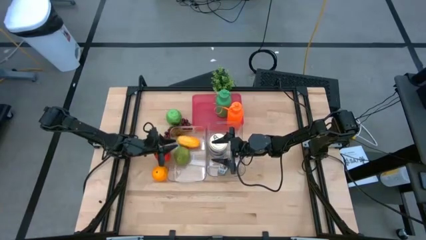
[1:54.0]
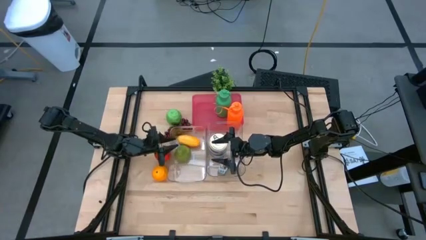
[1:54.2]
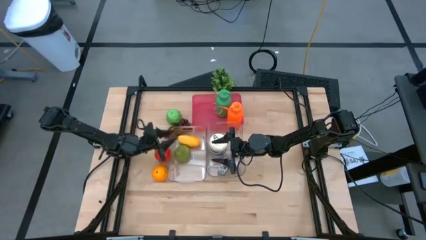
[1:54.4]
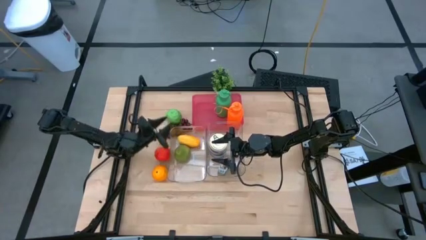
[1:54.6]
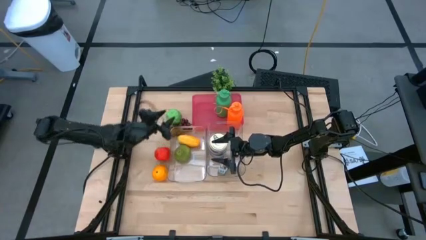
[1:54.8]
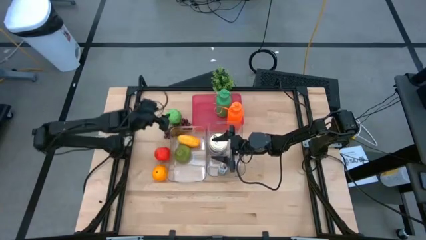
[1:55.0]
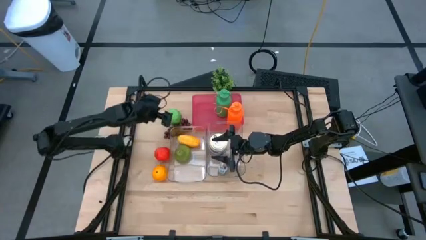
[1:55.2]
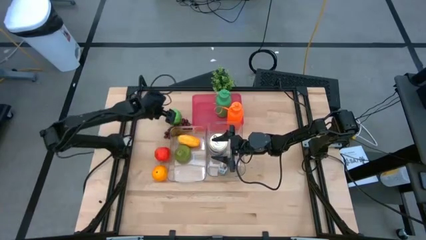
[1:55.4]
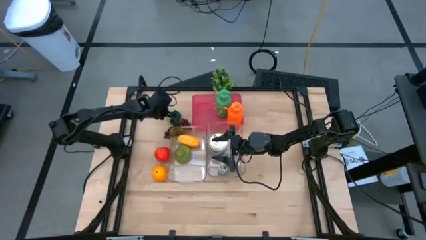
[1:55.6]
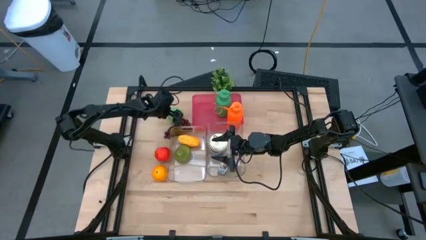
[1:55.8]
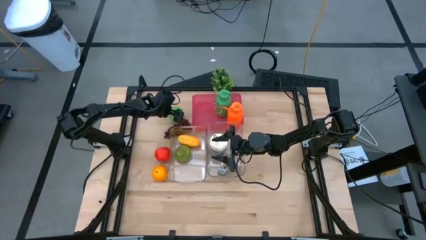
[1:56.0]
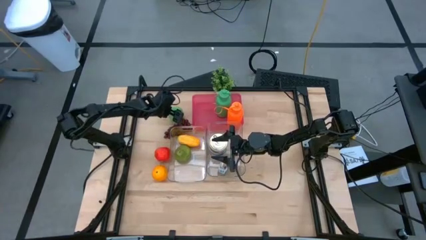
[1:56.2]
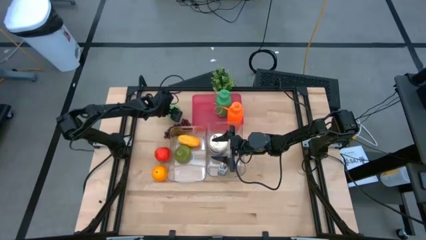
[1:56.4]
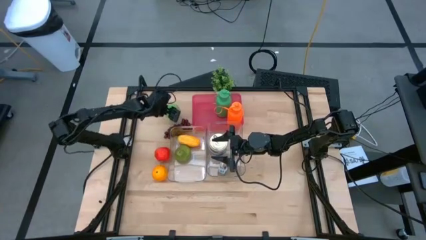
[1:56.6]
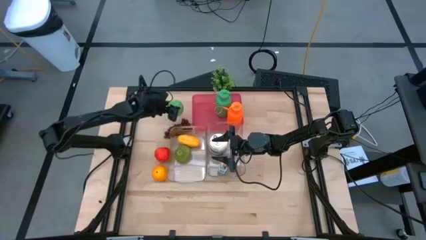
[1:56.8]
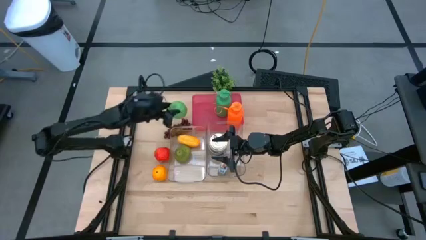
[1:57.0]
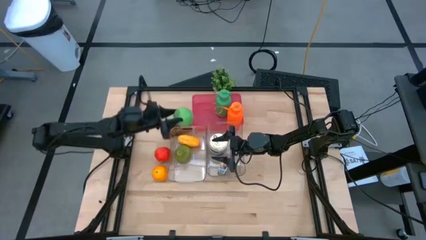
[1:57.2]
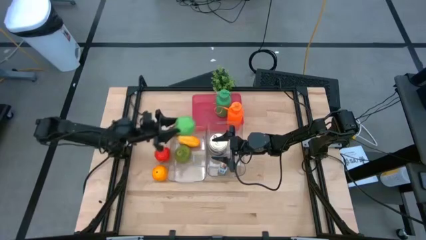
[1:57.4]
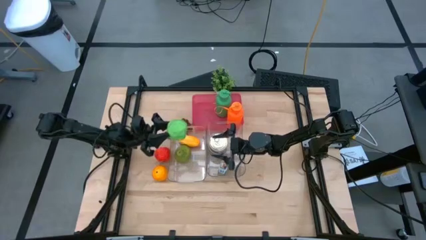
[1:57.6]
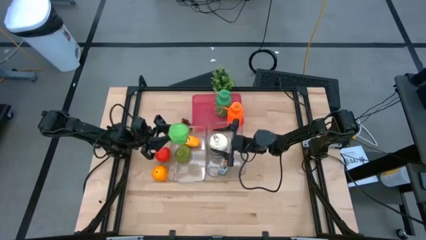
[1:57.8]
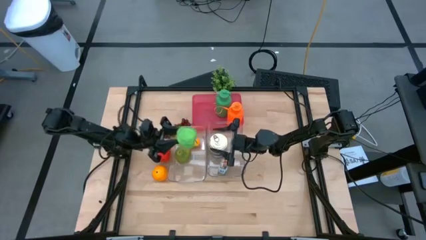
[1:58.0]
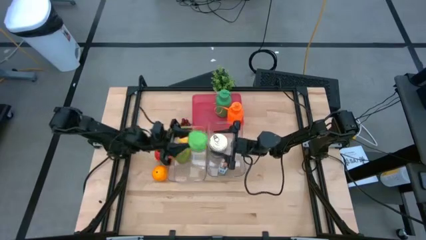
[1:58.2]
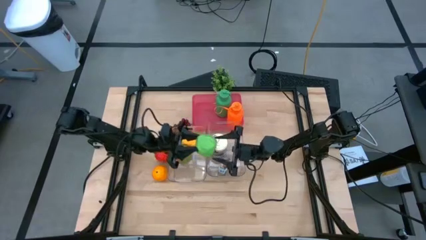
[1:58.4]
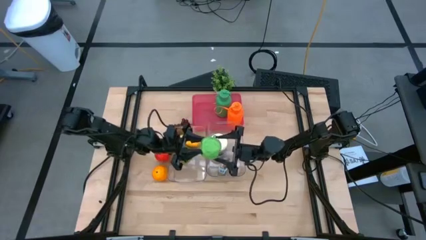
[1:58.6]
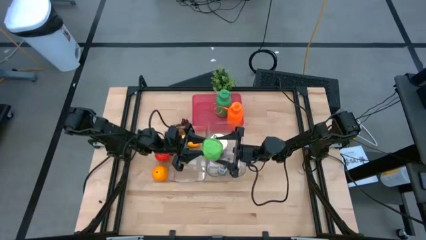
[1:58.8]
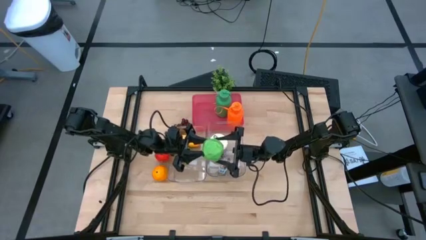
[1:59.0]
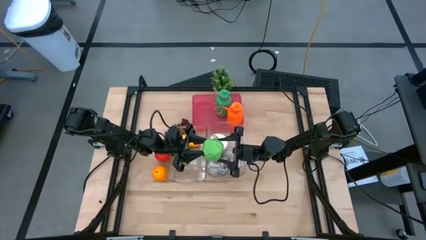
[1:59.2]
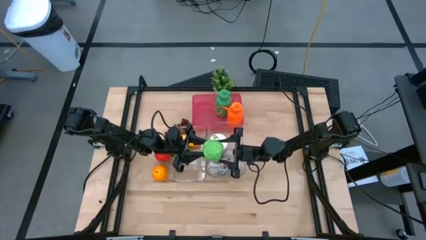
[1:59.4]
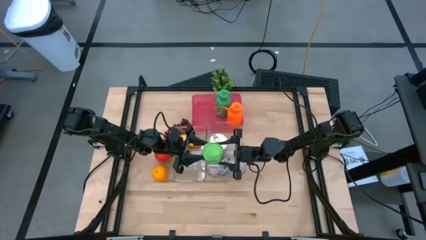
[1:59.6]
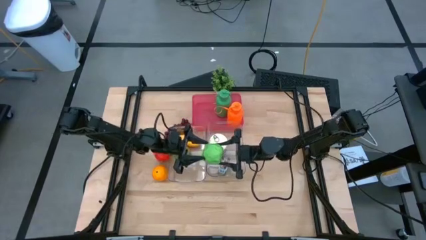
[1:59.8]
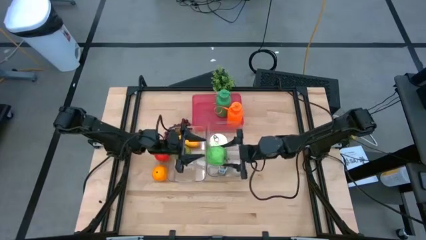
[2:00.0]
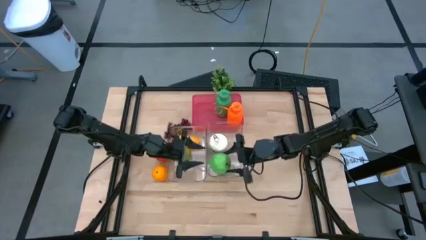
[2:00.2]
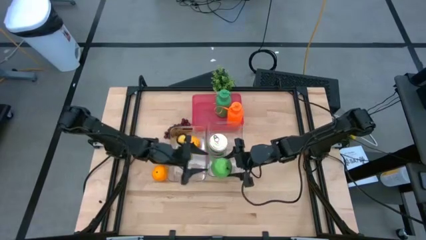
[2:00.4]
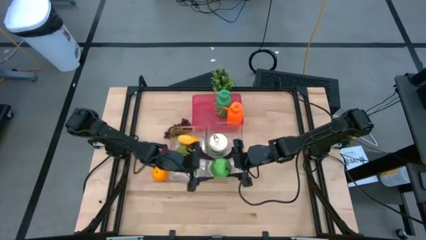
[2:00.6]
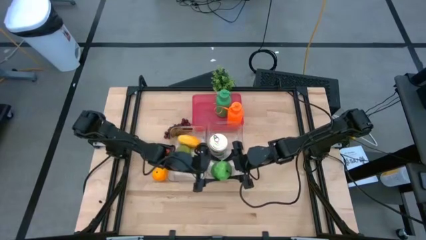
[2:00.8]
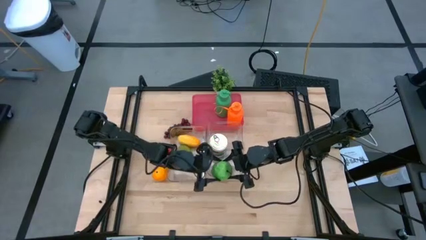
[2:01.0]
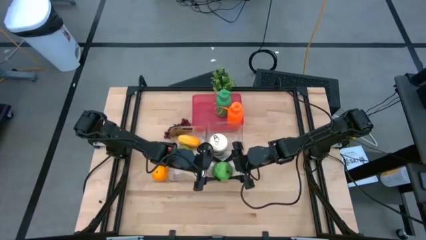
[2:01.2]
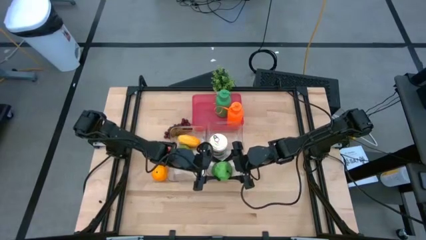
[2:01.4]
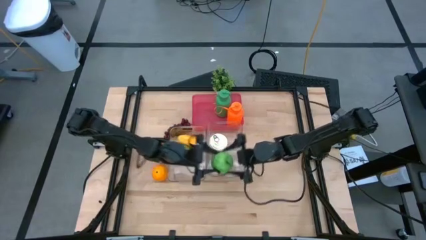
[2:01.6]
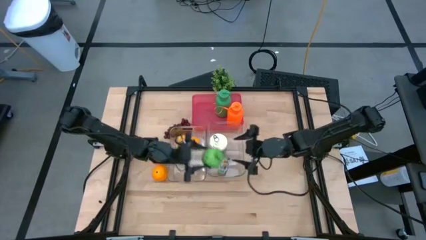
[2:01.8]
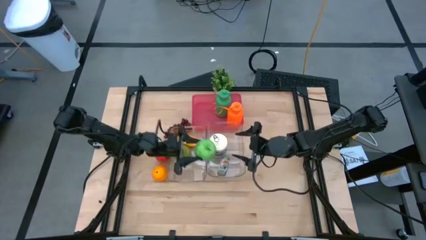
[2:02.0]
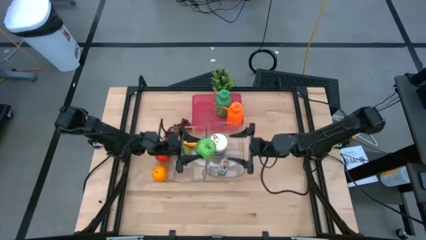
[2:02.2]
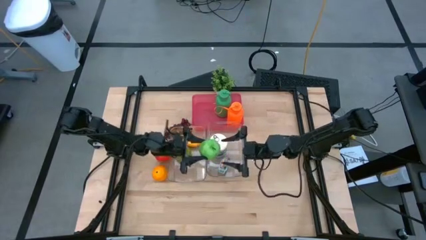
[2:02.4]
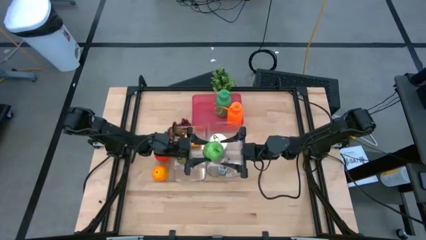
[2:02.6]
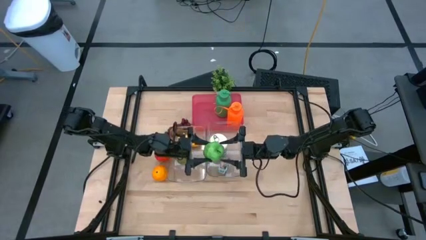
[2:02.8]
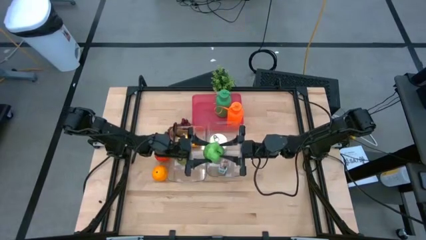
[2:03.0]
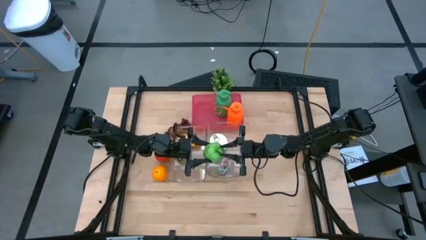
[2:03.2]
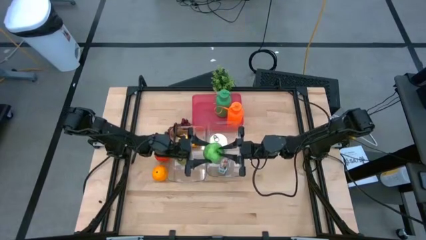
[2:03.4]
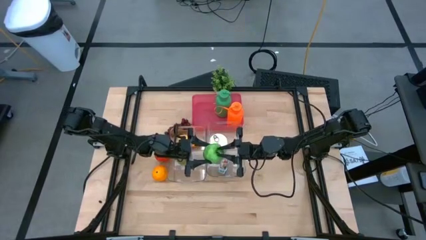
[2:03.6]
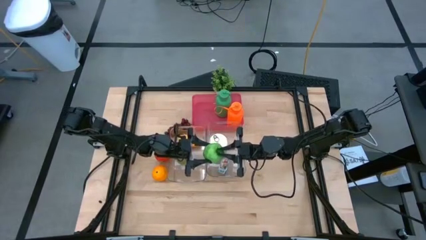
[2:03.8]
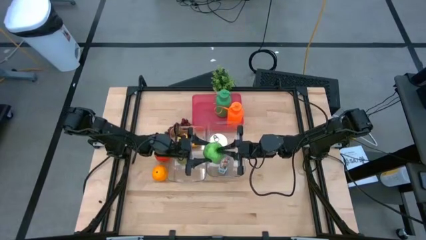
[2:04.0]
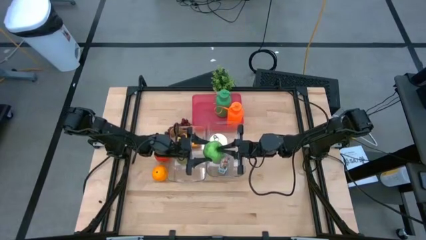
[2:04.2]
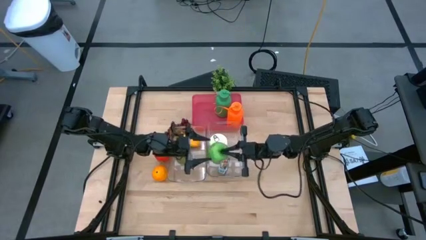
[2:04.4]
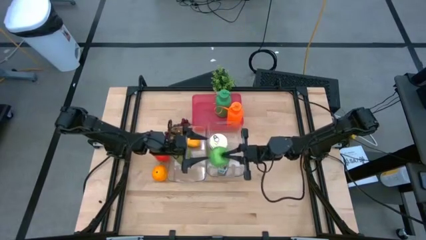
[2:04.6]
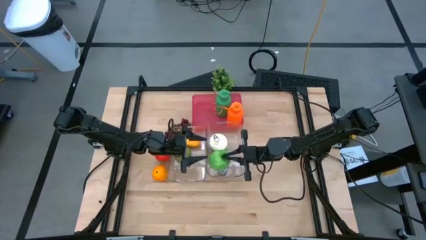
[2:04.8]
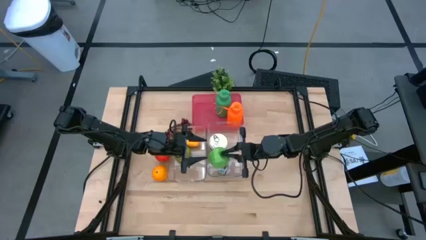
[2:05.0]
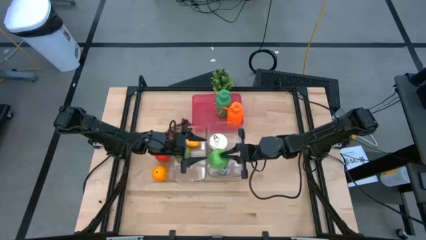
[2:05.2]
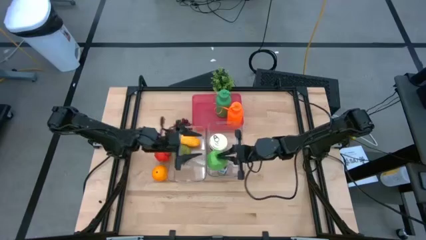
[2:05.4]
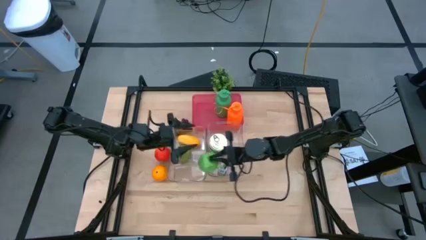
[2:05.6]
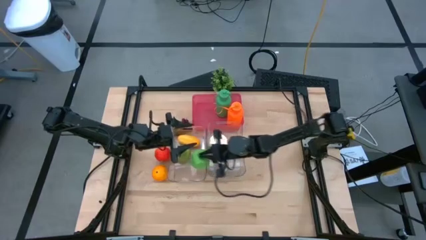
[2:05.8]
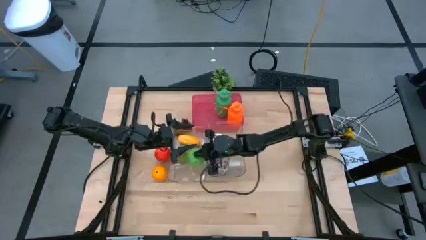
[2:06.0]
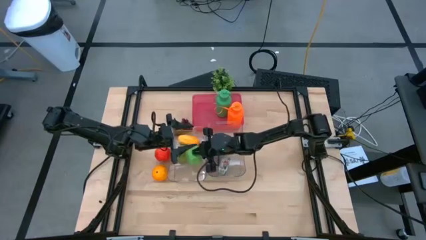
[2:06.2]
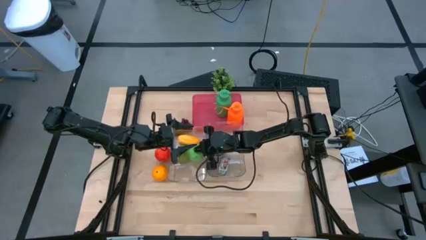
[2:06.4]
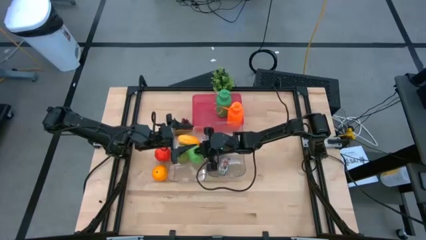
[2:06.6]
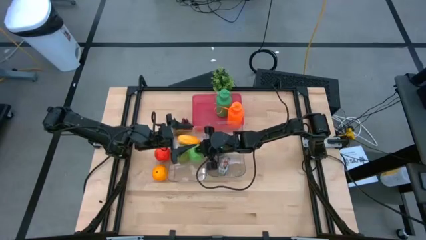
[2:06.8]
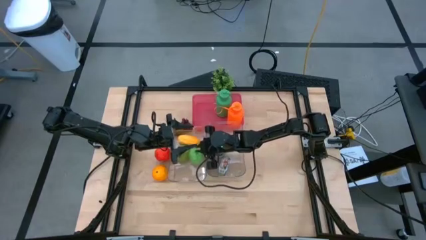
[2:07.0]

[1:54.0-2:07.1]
Task: Pick & Place Food Item
Put the green apple into the left transparent bin

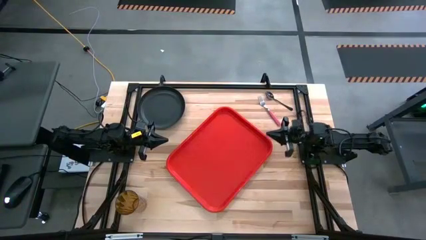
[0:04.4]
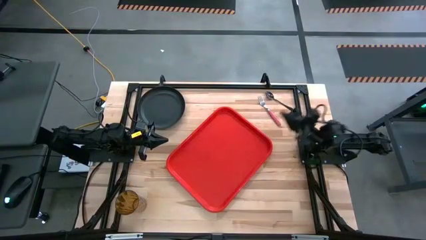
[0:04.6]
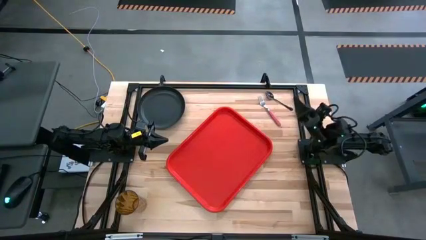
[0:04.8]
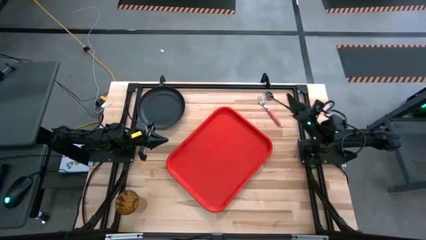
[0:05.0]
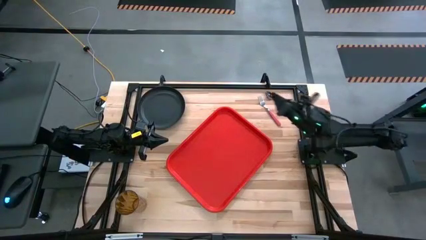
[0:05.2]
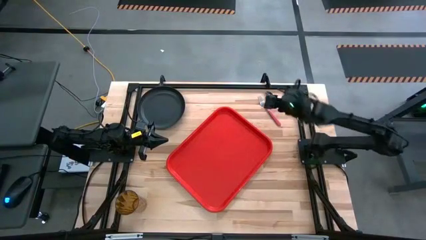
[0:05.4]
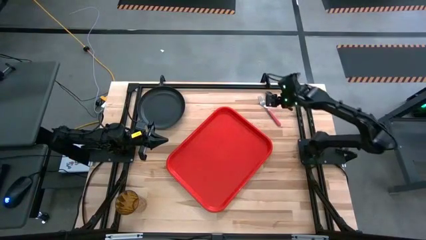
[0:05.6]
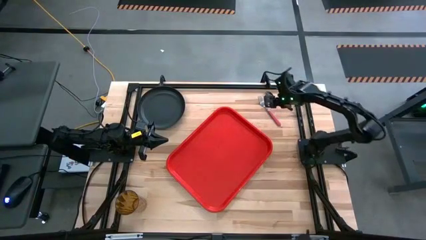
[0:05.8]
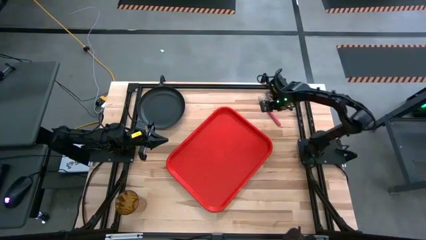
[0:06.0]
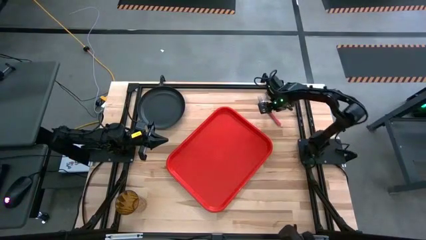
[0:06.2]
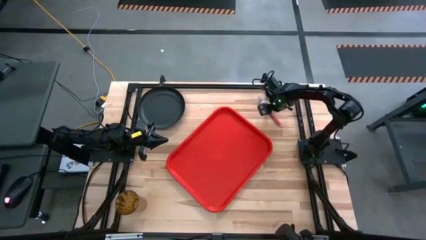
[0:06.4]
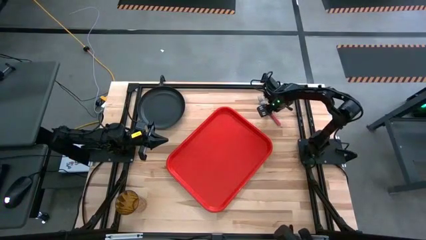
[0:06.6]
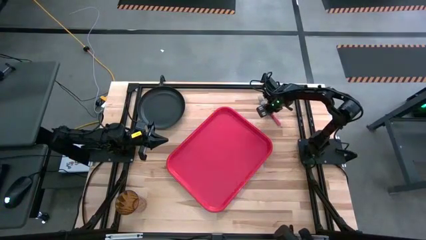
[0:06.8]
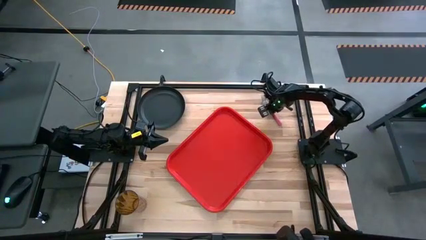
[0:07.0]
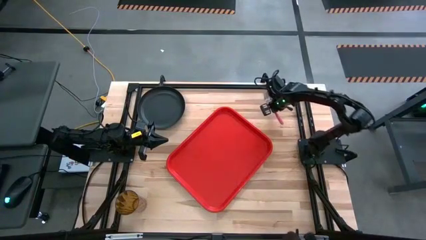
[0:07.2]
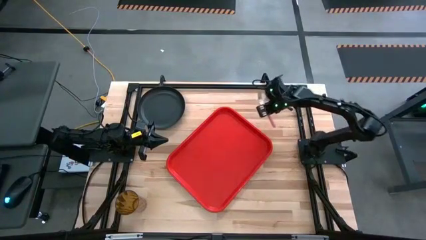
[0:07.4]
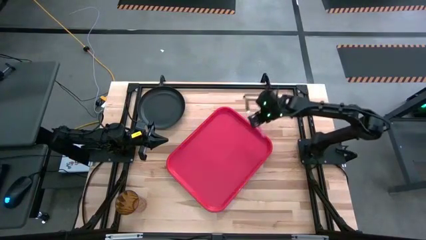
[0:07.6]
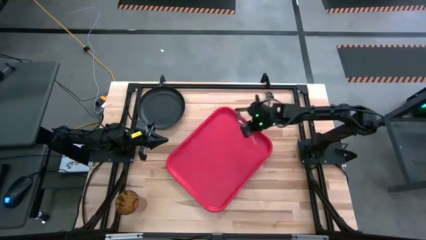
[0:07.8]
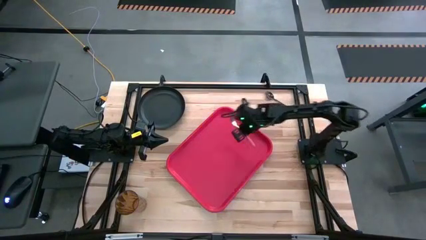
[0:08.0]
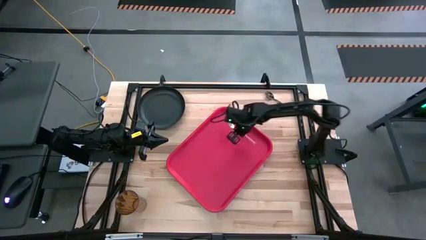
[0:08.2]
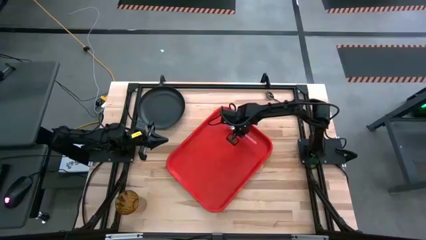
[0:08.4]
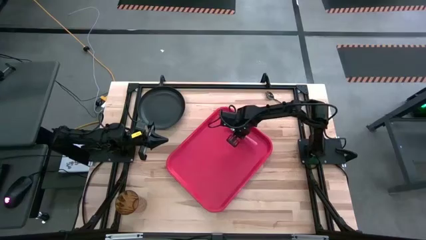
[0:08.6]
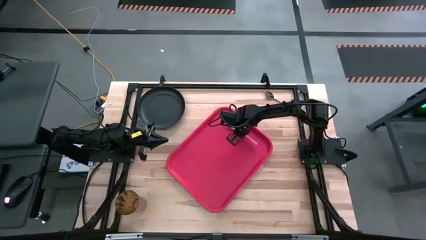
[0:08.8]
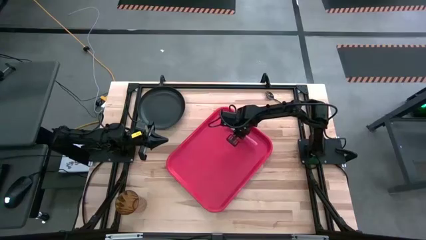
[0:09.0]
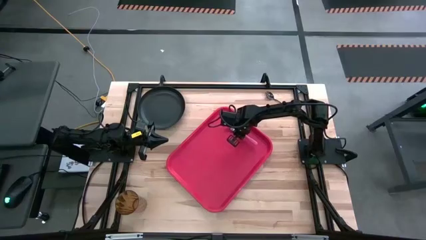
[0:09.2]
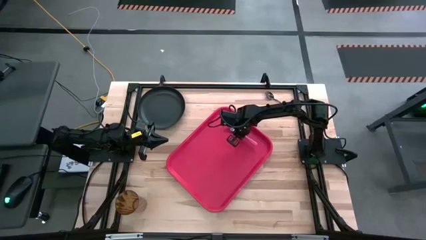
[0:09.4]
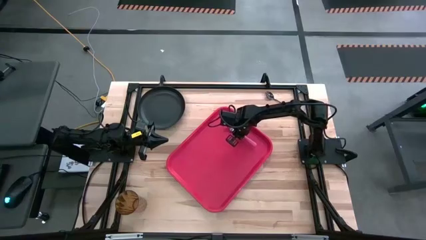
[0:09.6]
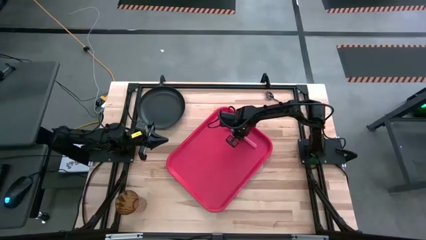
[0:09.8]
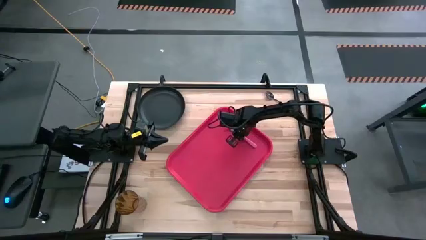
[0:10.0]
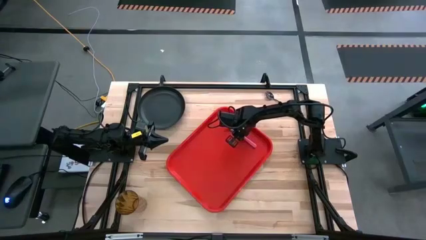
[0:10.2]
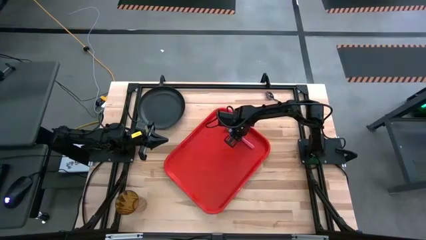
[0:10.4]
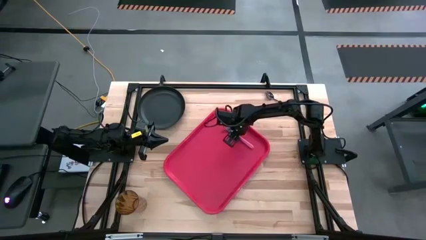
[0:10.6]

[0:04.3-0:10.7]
Task: Pick and place plate/cup/fork/spoon on tray
Put the pink fork on the right side of the serving tray
